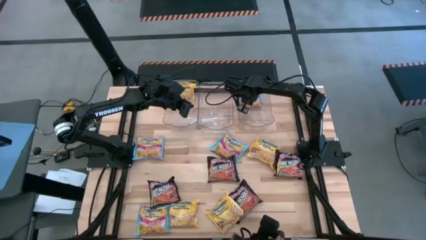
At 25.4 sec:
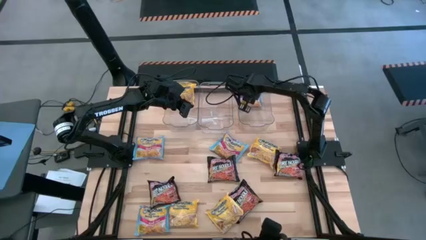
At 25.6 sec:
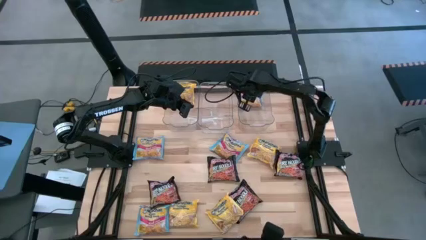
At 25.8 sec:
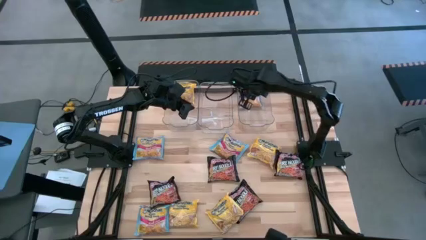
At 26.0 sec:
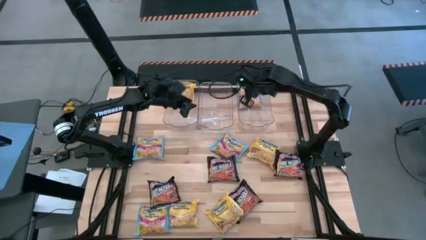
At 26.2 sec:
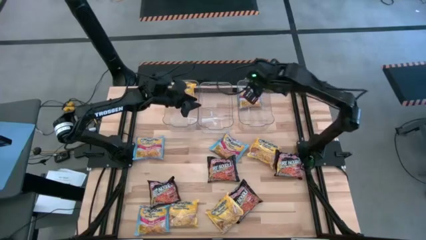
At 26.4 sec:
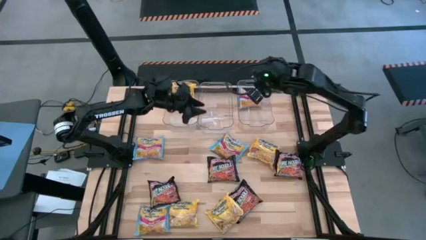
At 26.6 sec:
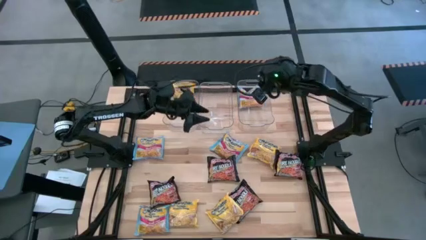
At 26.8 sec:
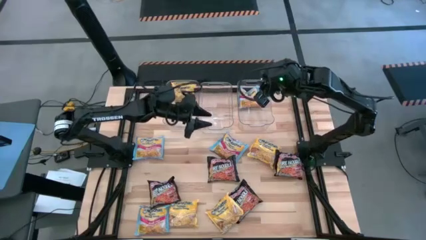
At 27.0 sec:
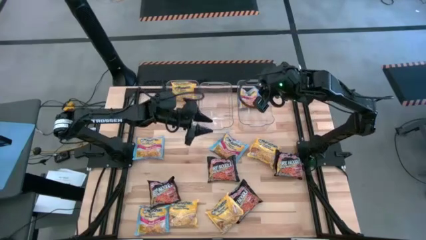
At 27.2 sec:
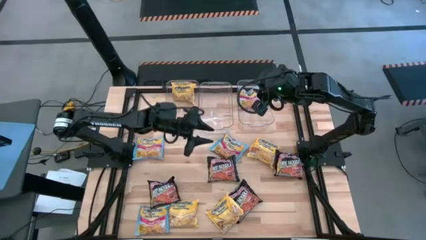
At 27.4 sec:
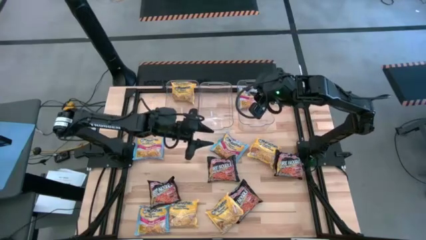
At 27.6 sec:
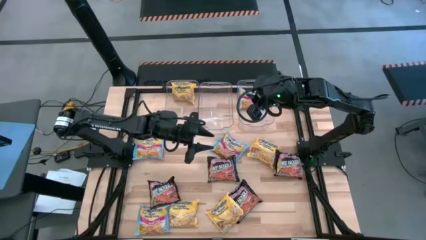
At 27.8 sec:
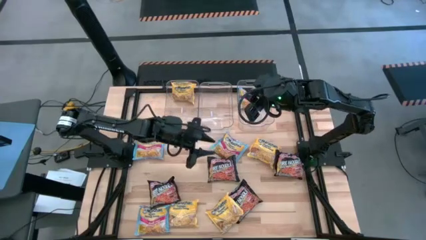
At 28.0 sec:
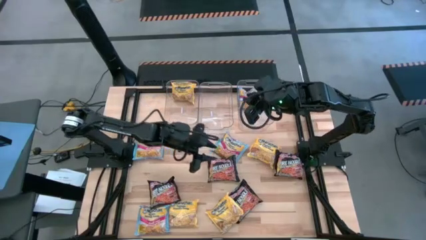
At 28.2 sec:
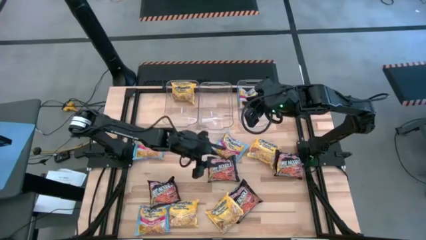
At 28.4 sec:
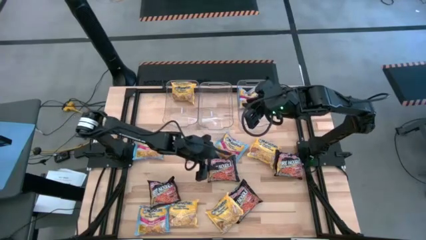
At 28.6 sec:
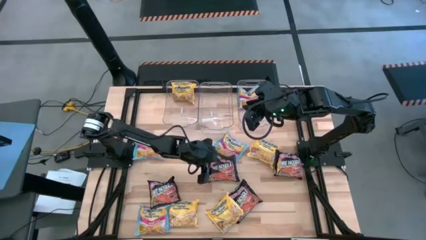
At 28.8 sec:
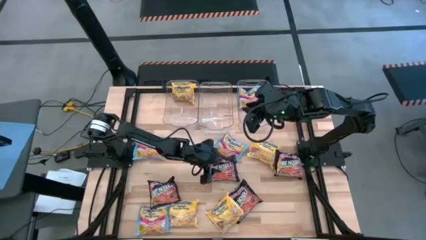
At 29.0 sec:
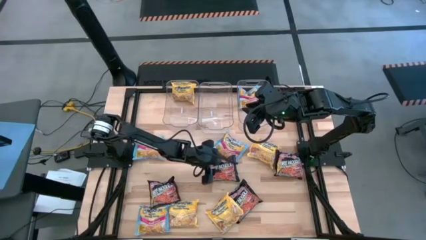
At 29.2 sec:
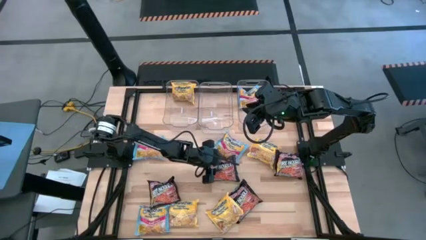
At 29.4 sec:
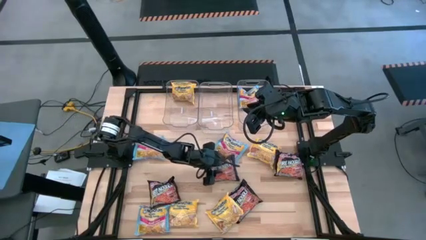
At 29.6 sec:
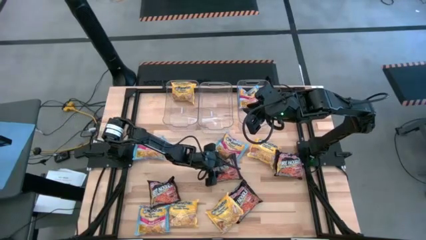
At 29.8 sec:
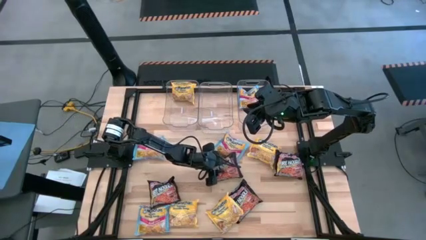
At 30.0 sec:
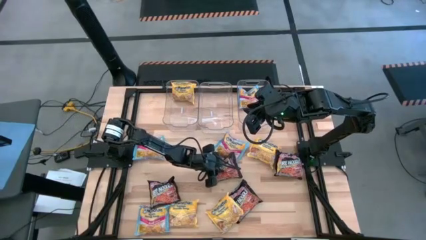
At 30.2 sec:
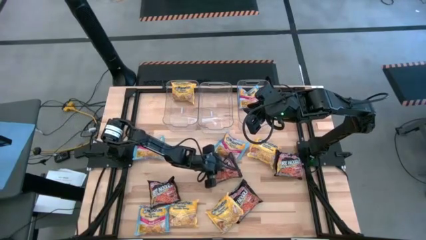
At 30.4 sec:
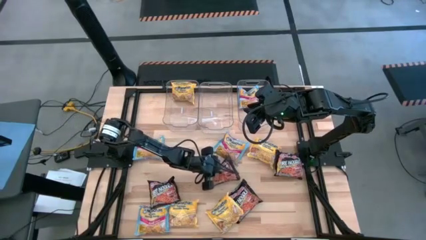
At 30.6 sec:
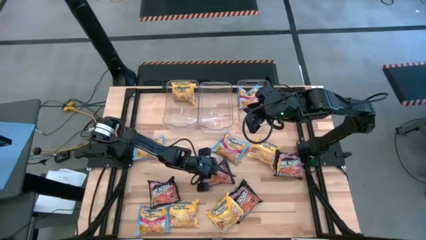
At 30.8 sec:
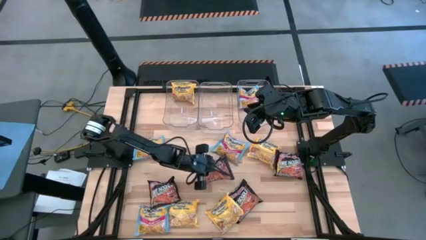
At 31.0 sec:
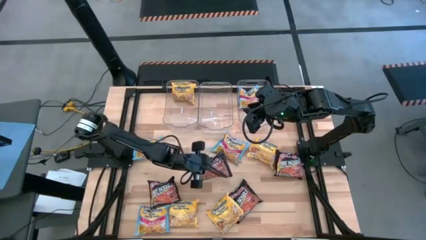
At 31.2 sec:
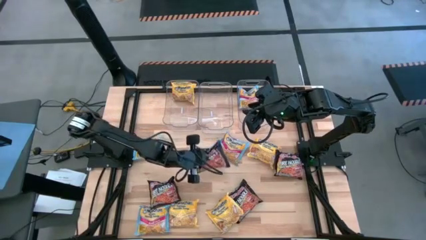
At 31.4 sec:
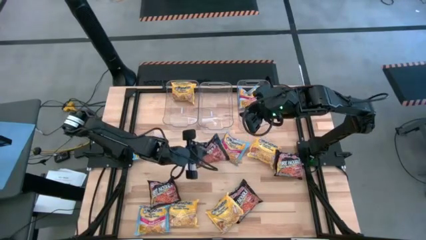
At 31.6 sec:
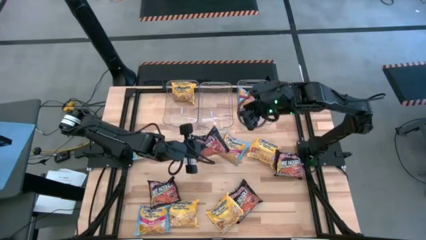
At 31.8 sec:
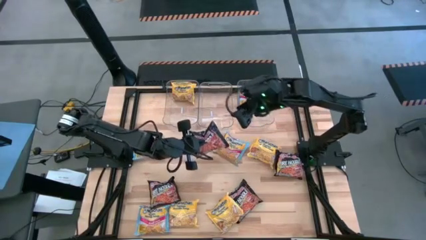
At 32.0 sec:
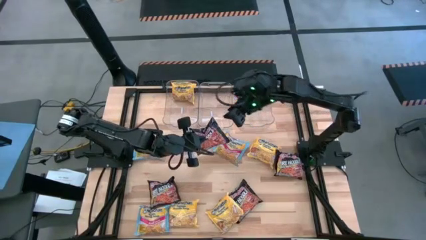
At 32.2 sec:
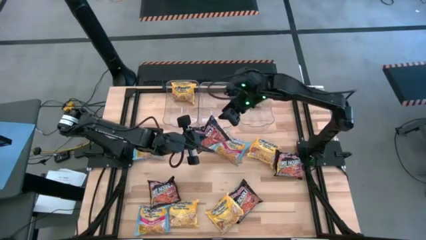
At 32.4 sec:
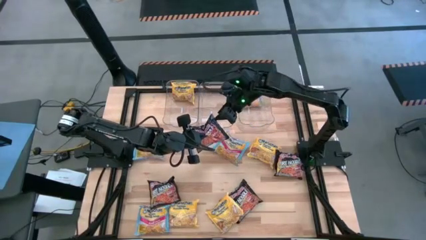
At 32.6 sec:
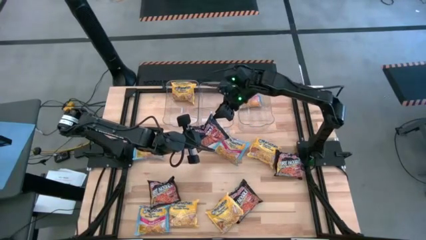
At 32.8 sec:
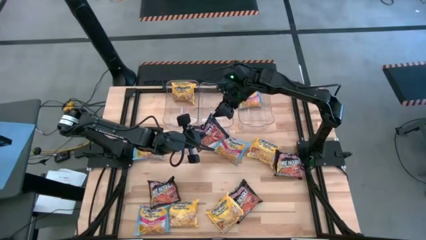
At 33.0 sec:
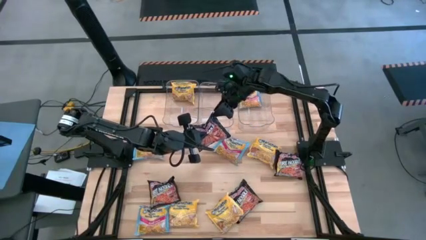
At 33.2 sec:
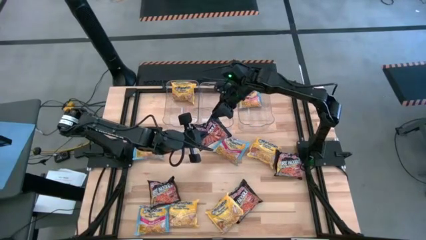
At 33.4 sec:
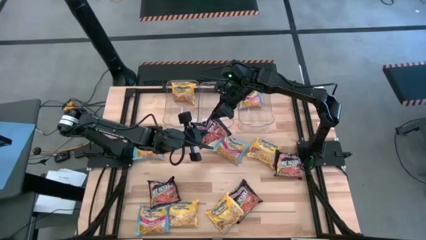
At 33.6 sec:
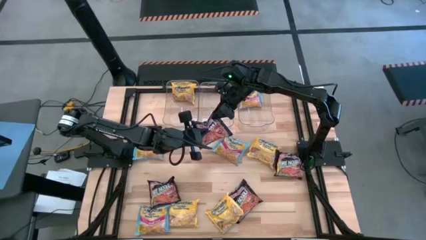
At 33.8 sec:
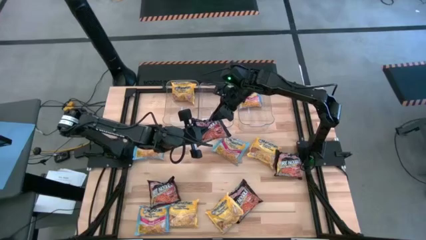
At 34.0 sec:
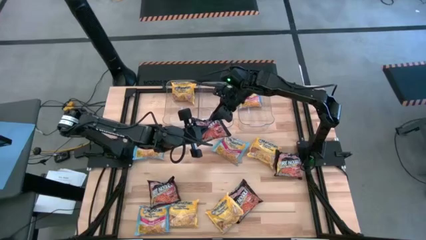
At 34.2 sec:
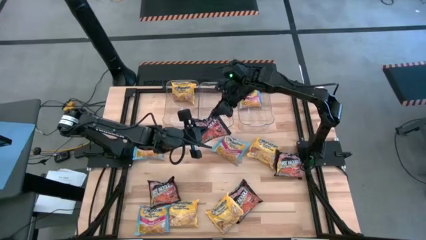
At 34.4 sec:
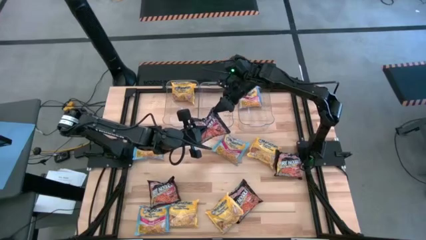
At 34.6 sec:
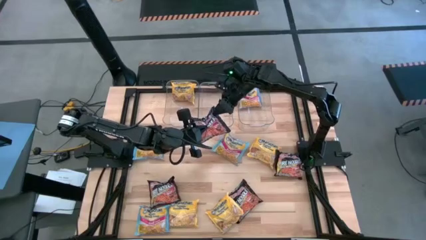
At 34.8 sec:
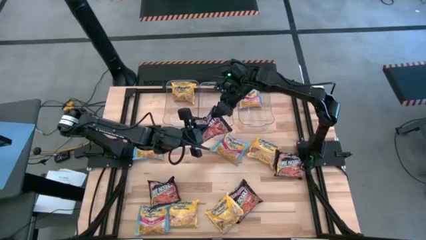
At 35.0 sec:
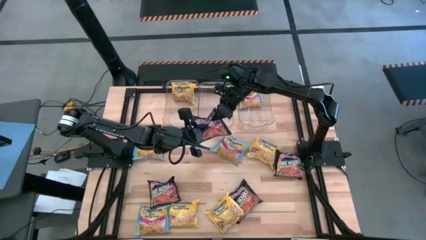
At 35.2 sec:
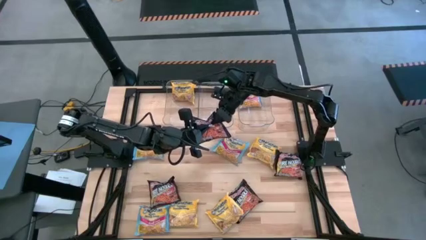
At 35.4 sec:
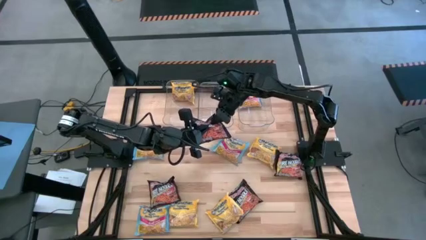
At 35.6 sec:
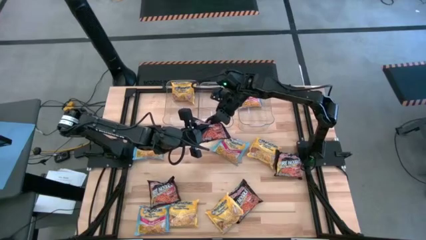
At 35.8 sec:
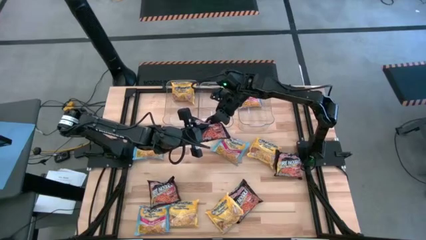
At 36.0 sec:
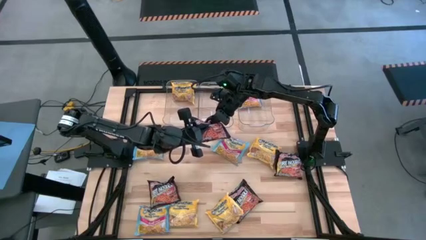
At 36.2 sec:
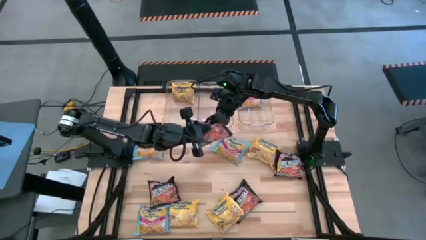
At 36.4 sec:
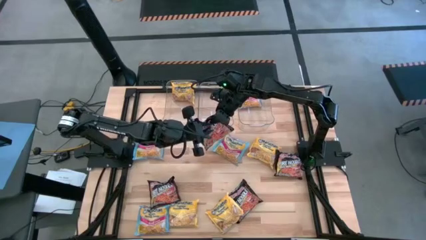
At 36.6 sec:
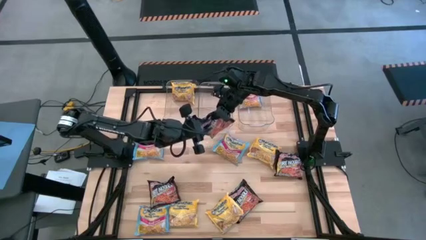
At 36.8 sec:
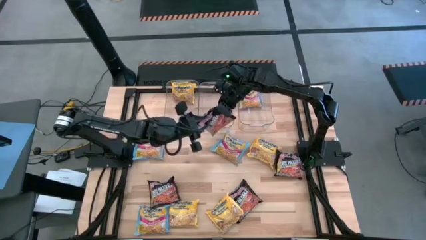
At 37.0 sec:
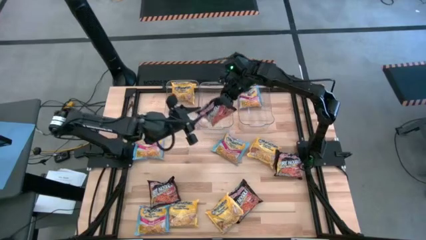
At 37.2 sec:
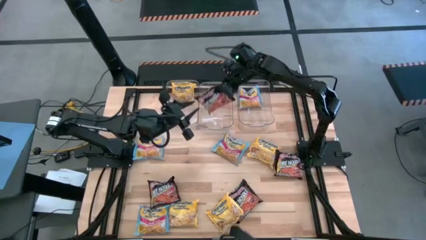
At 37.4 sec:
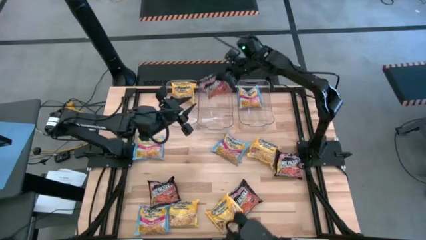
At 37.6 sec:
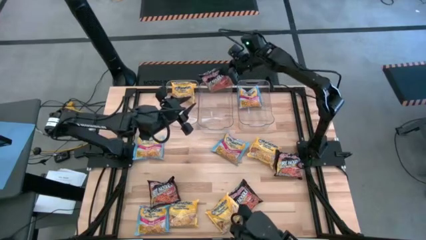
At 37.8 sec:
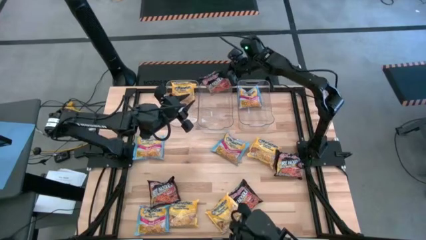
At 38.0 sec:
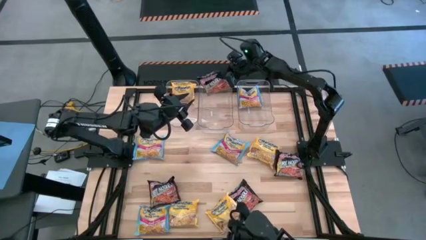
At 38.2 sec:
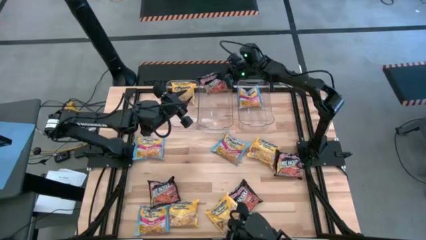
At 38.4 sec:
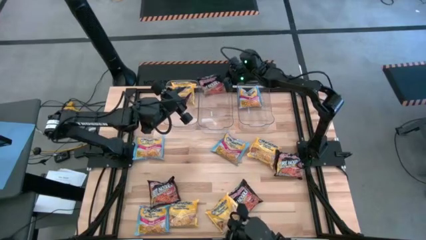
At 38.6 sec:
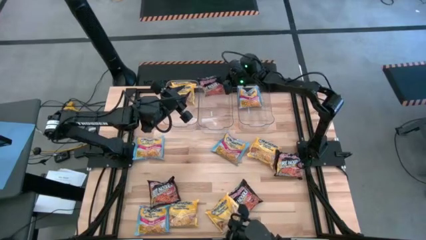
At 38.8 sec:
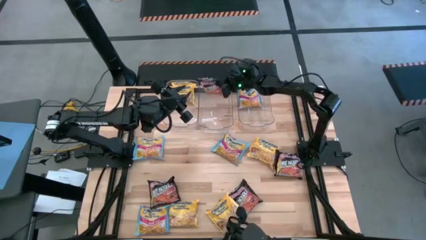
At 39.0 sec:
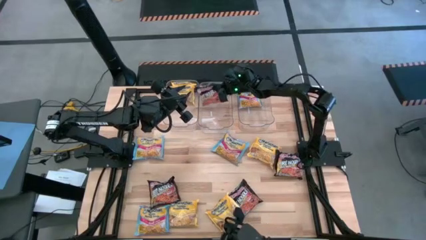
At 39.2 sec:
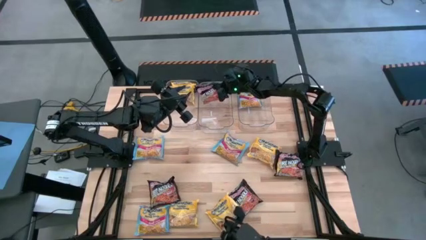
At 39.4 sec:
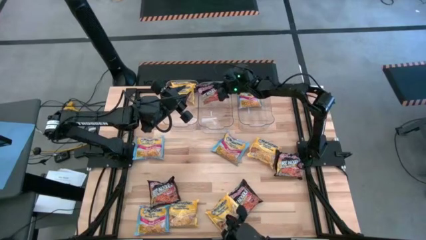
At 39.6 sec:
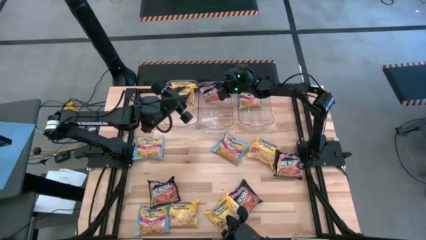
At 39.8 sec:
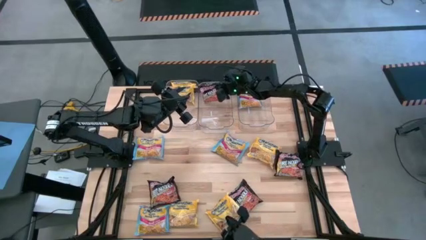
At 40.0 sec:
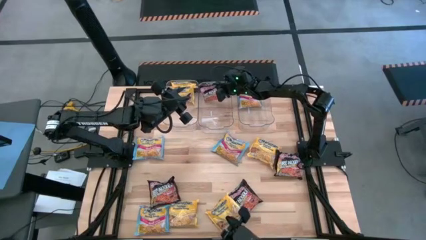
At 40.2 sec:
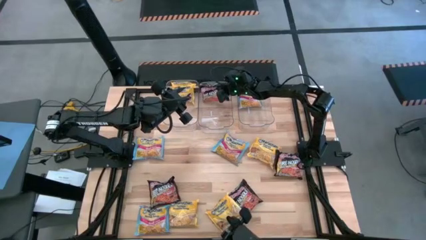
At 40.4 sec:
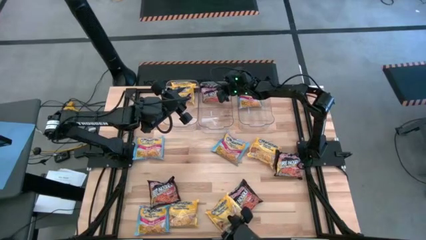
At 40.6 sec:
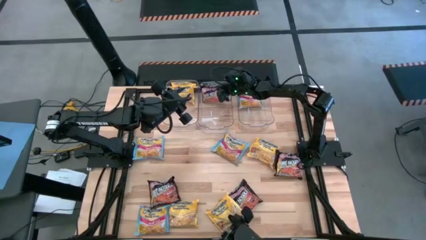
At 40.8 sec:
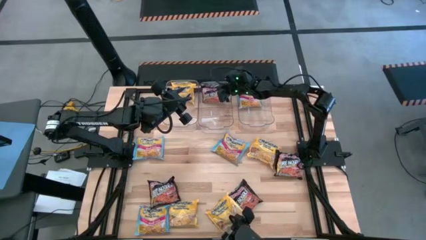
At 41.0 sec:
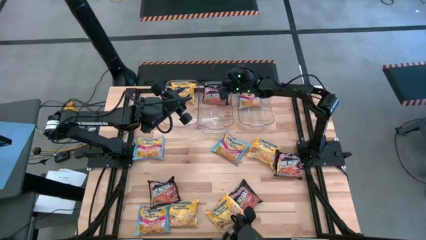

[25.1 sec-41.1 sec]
Task: Sort Maruchan noodles
Put the black noodle pack in the middle transparent bin
